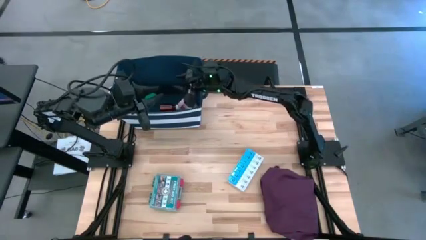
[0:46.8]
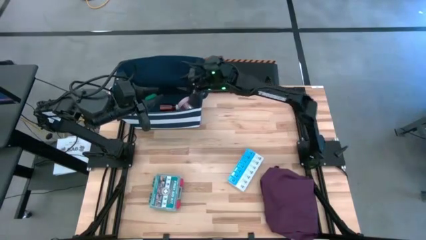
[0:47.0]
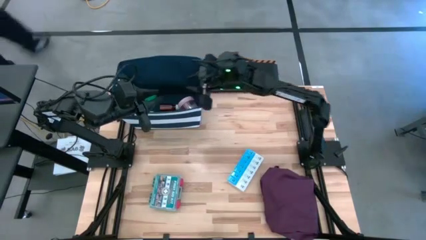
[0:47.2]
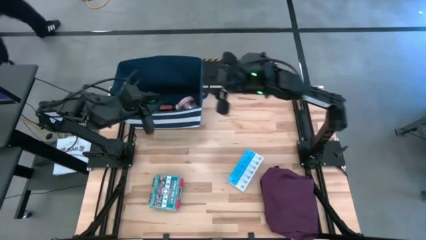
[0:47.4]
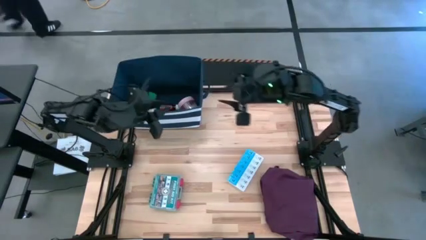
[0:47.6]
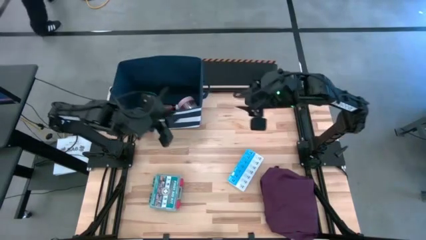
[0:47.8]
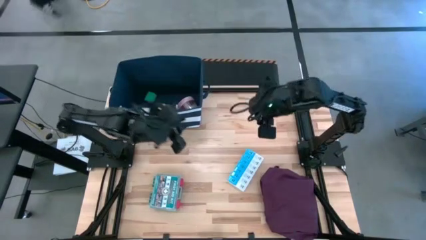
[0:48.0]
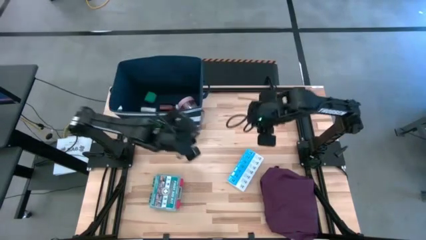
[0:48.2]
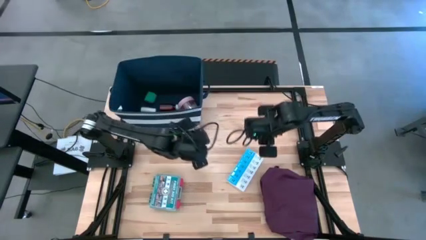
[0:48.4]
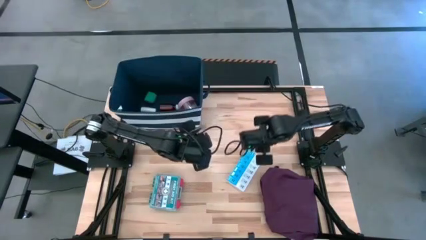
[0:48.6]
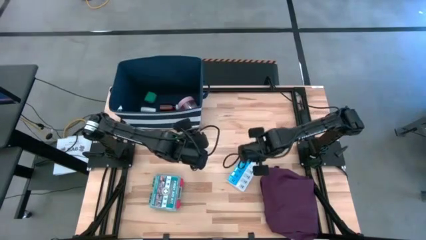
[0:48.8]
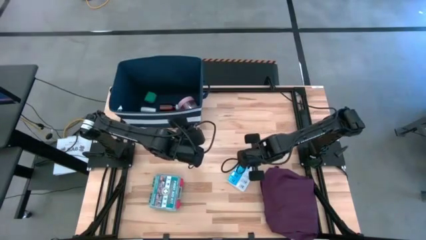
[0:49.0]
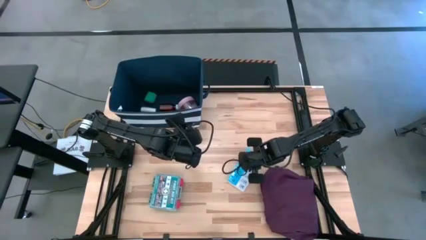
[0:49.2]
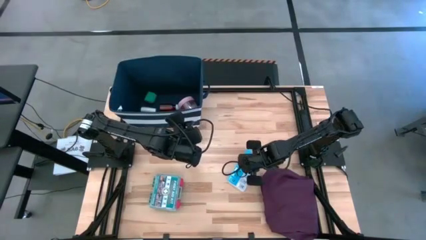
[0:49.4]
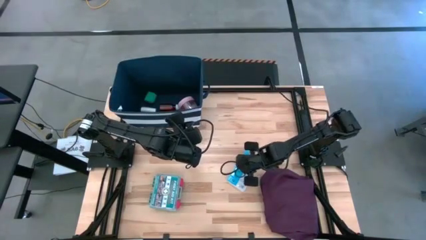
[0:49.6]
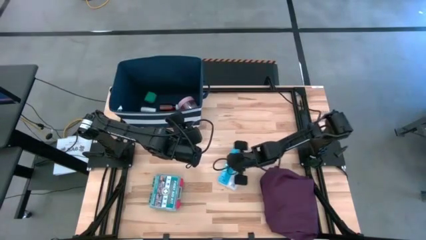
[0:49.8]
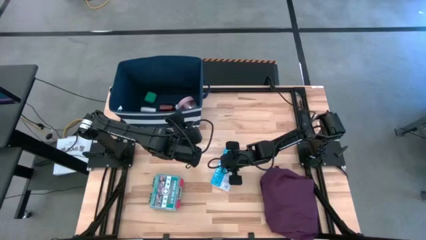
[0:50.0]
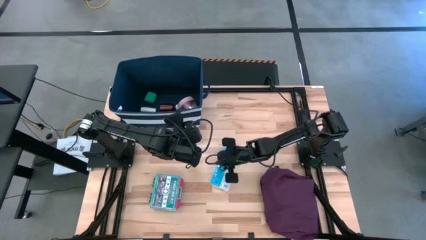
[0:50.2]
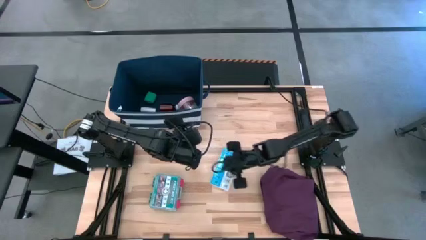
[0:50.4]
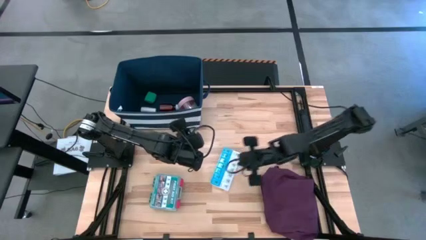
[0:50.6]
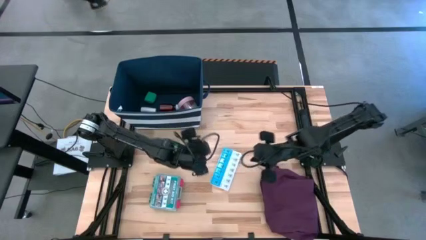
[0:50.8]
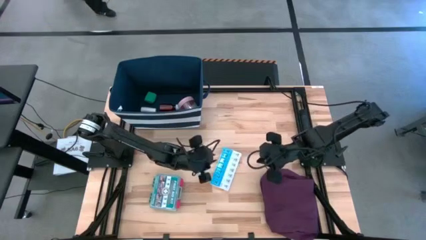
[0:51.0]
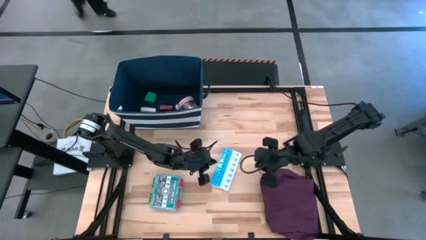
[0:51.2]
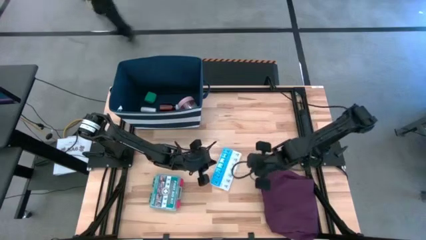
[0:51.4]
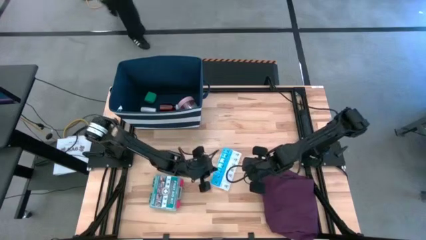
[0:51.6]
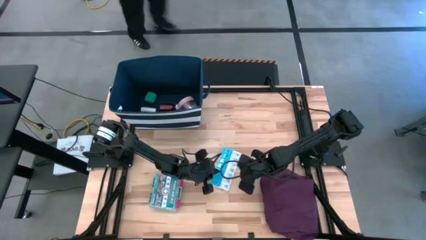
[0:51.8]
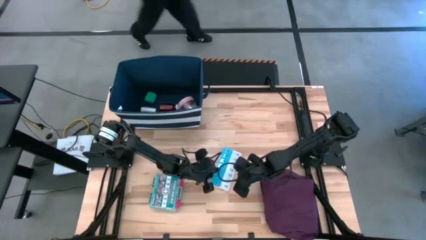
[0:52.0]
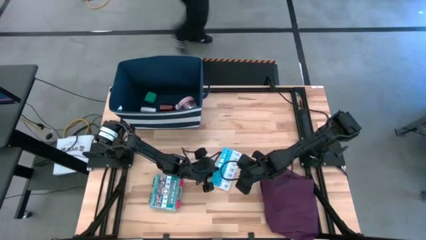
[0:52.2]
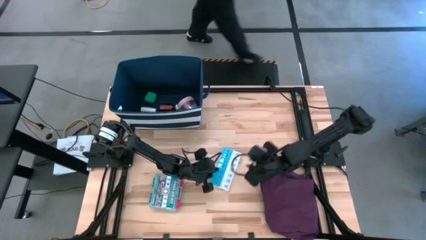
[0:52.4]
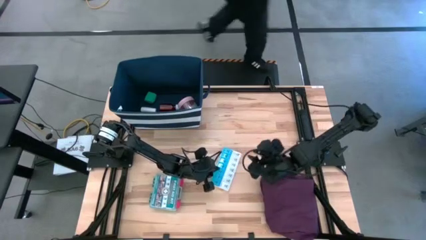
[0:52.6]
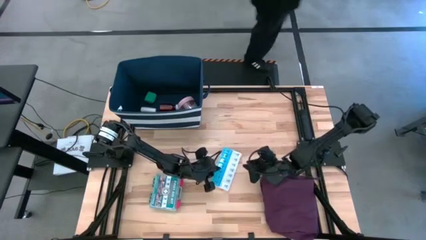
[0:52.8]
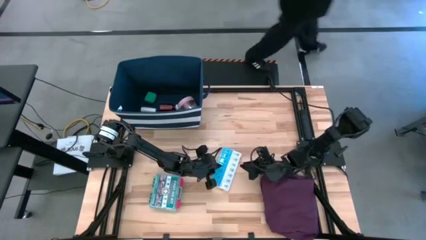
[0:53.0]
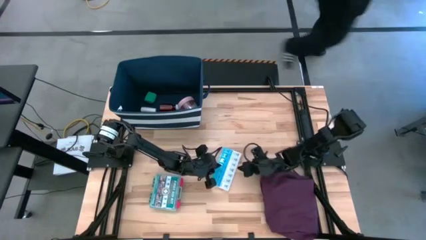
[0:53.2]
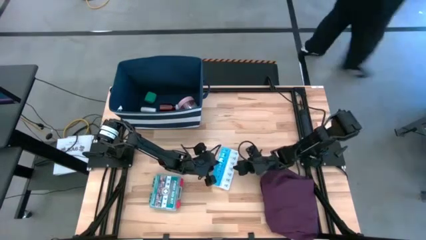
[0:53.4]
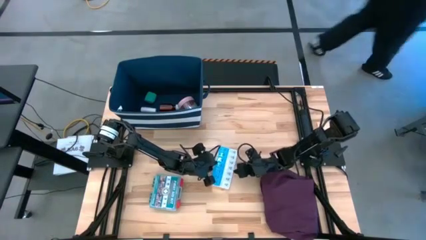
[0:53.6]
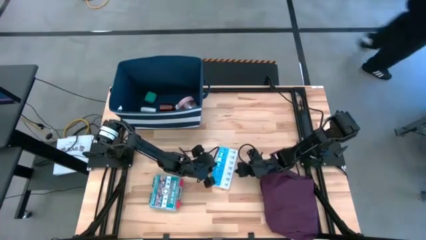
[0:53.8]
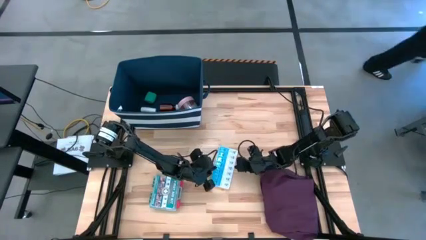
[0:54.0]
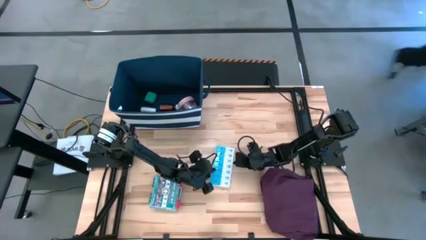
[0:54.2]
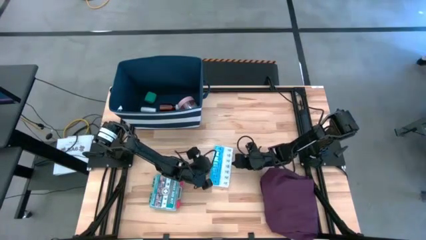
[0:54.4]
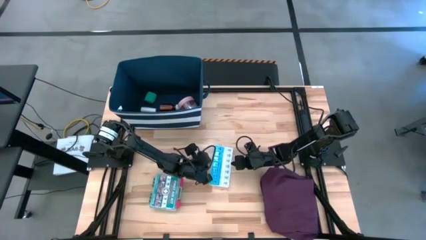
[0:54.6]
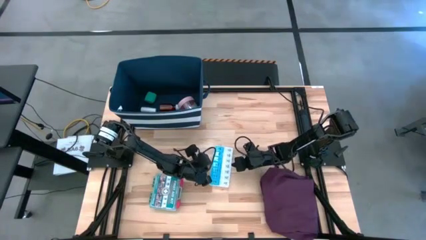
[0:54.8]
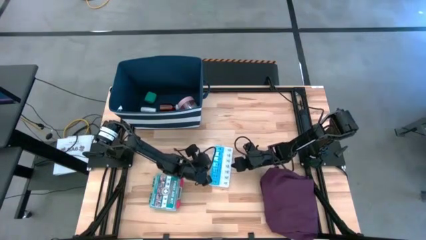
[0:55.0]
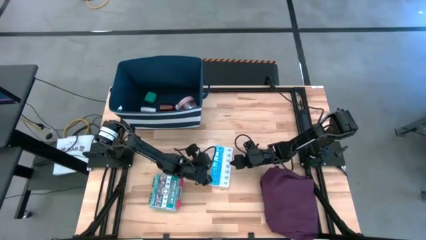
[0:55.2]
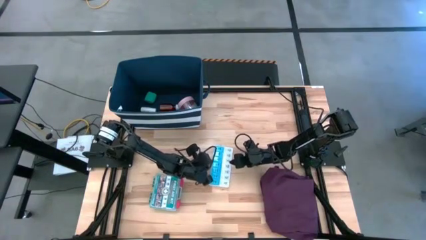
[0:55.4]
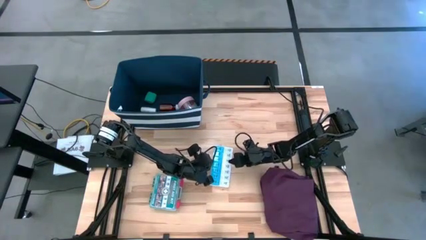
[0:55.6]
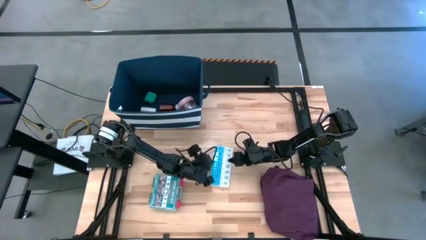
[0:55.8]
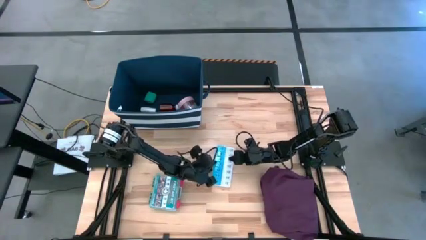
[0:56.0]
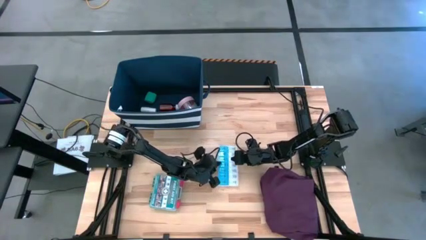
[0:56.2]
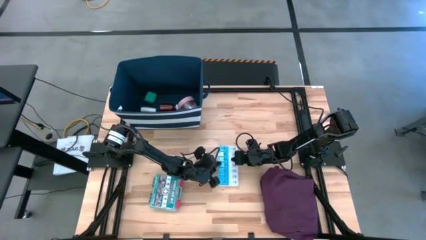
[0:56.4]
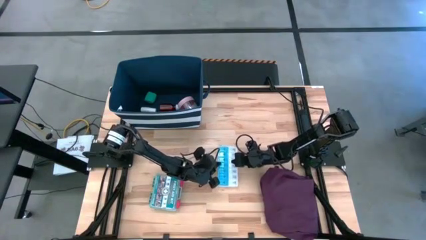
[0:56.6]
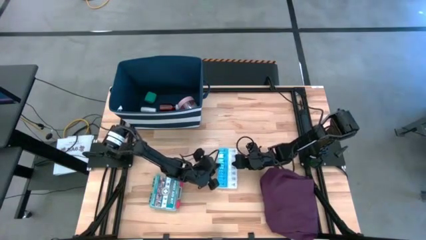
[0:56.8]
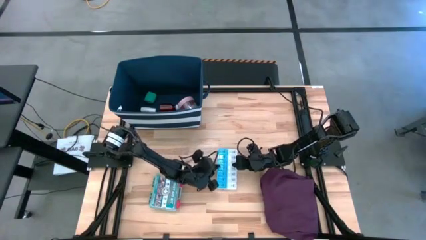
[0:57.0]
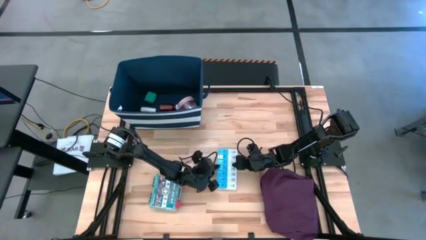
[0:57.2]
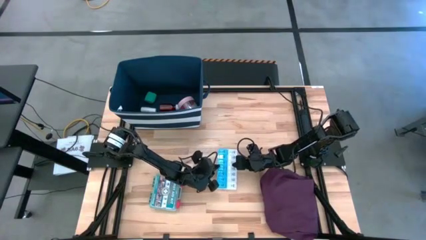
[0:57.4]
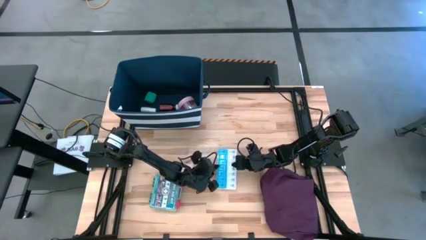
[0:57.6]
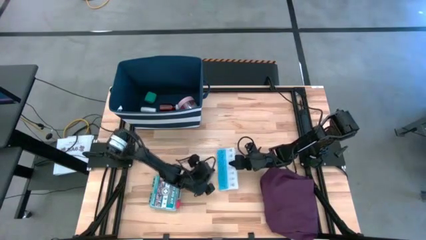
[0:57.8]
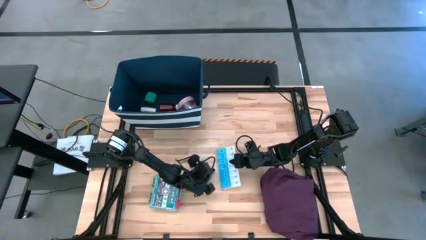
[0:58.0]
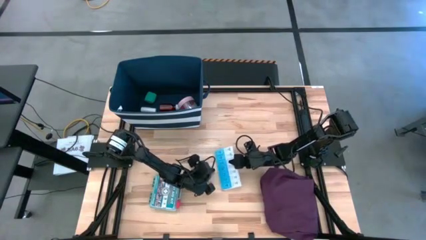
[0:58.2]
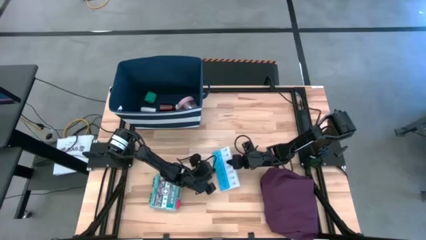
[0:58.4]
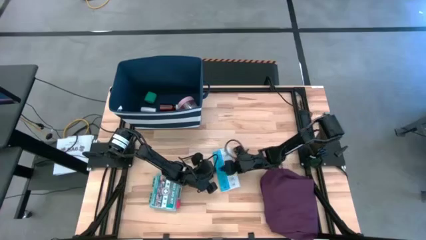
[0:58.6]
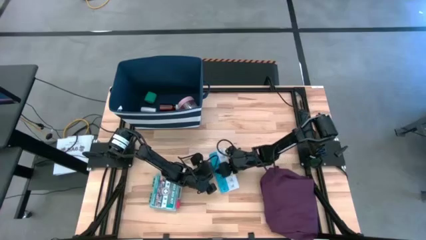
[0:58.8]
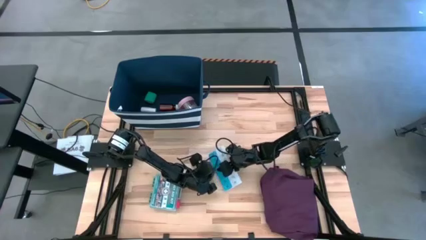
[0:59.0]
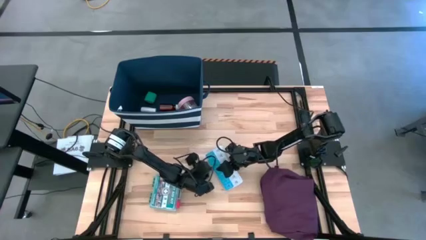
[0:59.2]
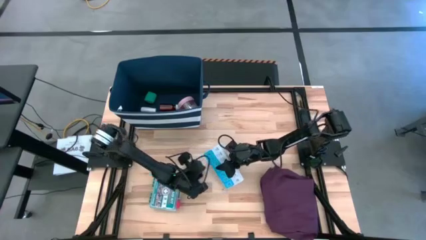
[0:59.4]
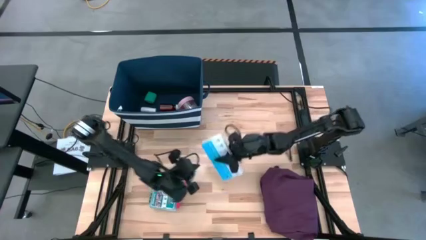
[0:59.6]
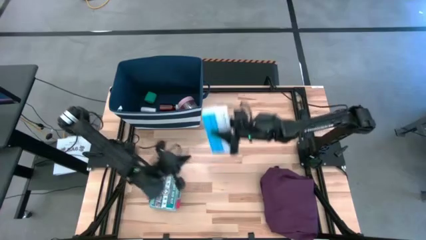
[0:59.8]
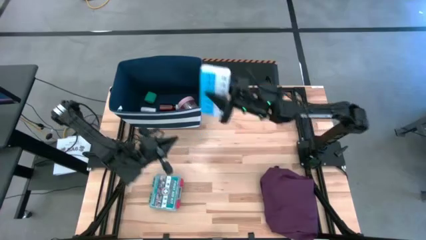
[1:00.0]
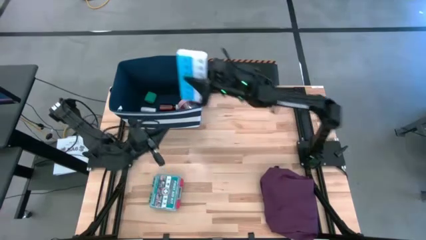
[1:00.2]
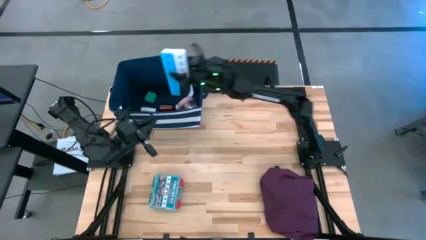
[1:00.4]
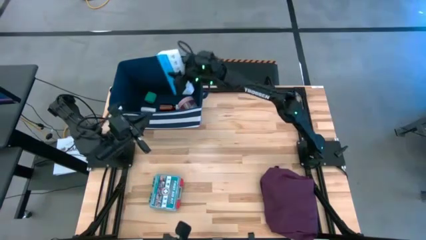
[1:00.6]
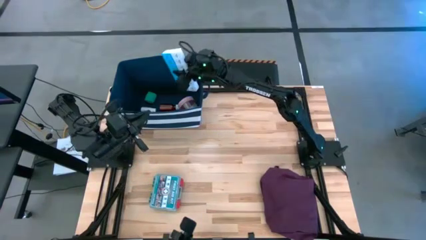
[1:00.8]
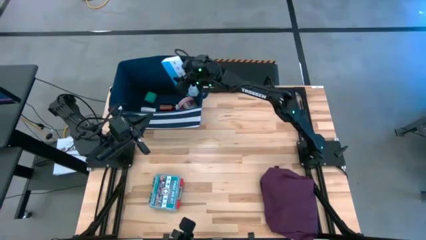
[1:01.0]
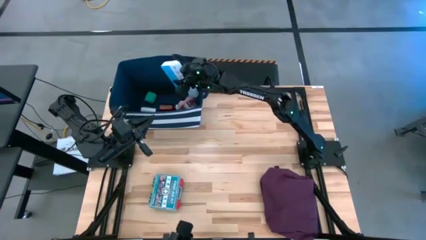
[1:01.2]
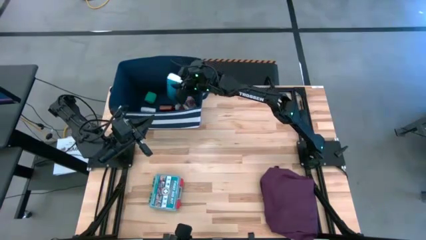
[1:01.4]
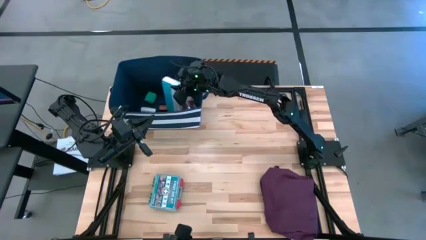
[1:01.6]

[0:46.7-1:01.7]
Task: Pick & place medical supplies in basket/bin
Put the white and blue pill organizer into the blue bin

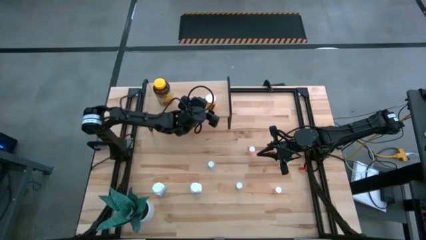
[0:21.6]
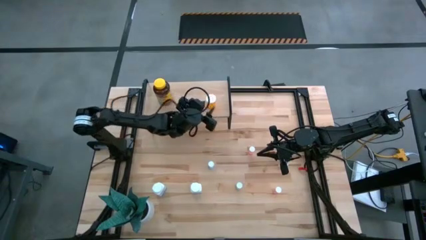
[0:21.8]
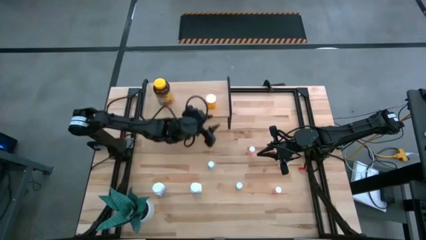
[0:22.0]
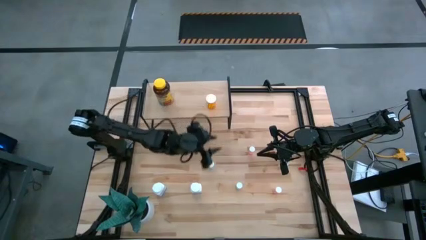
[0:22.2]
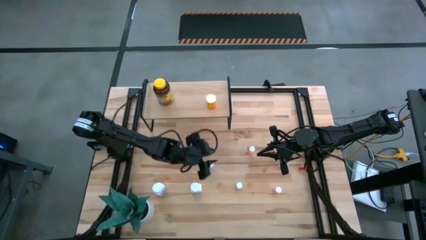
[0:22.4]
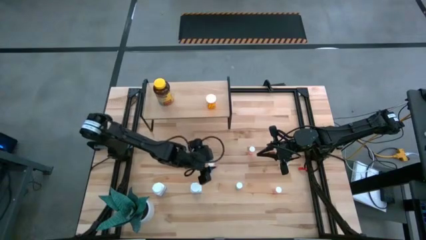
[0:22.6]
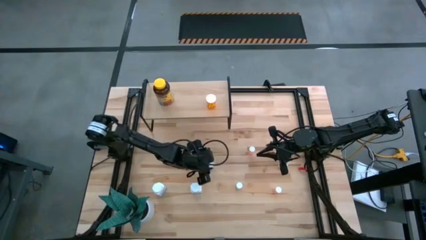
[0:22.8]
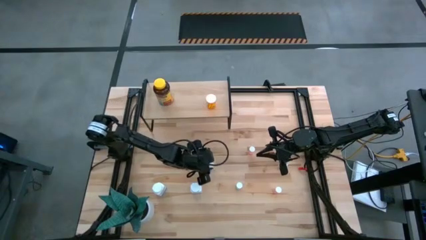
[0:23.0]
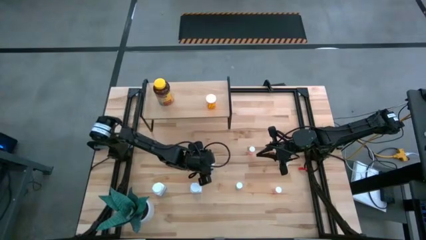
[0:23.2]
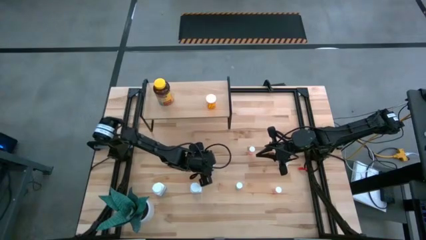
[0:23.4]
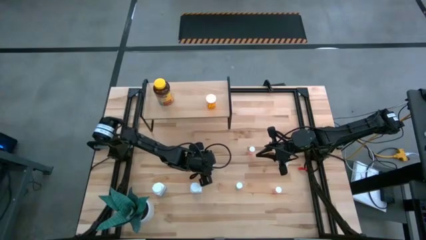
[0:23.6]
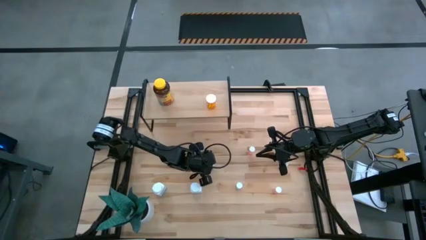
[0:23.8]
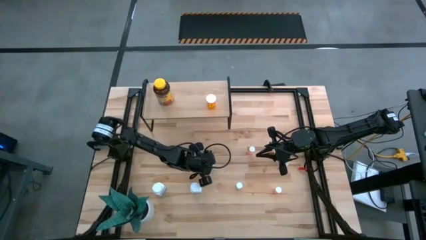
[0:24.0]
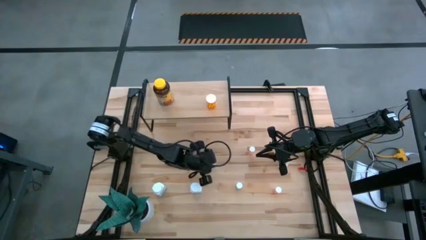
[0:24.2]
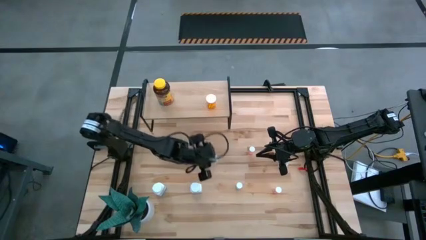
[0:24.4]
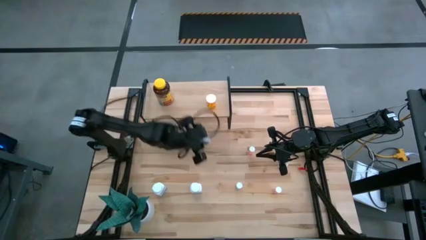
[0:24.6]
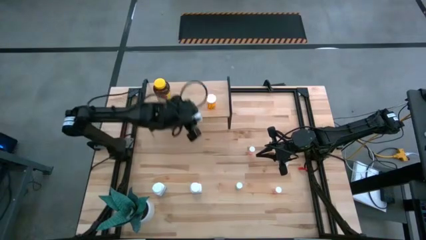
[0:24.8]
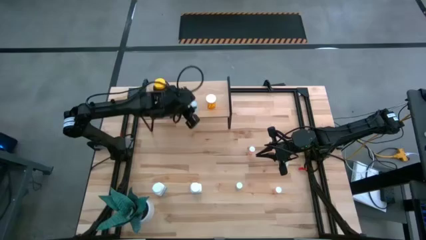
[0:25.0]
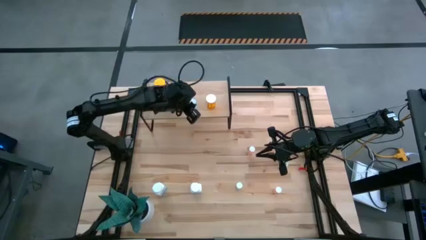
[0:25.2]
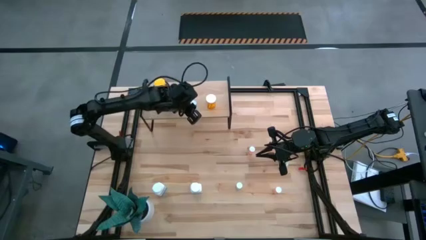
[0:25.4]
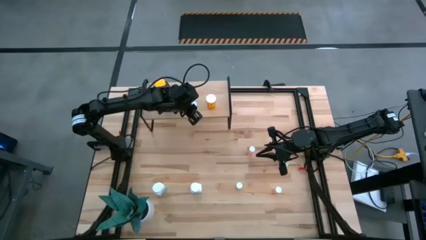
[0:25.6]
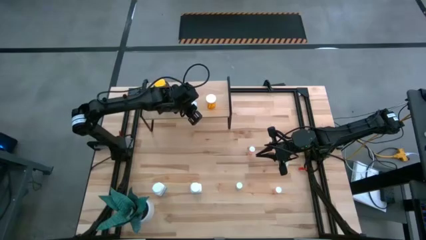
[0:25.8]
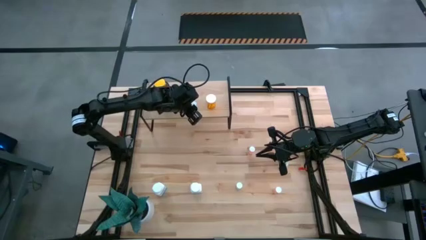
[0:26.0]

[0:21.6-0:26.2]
Task: Pick and place medicine bottles onto shelf by color
Put the blue pill bottle on the shelf
